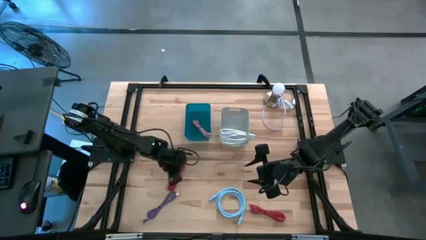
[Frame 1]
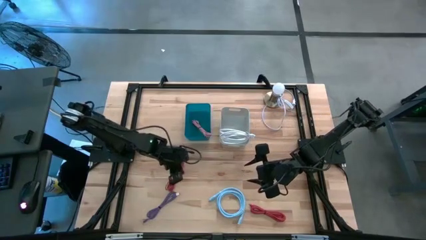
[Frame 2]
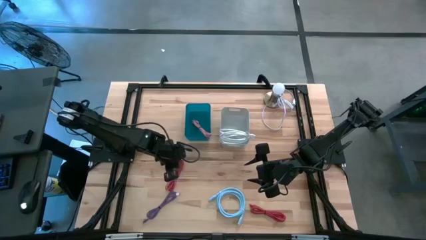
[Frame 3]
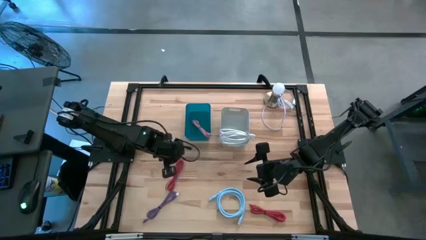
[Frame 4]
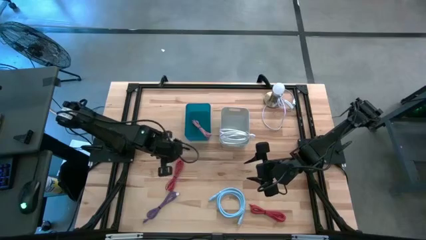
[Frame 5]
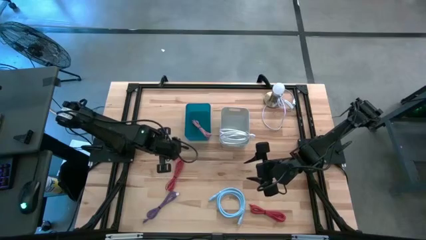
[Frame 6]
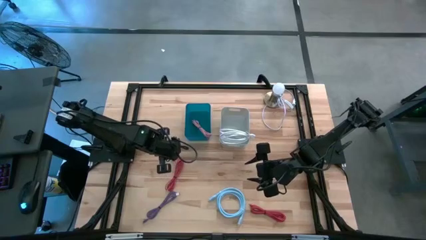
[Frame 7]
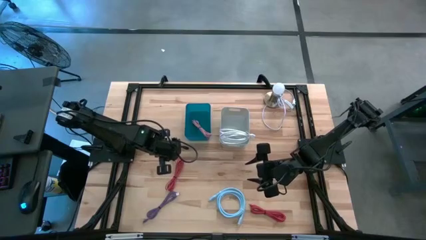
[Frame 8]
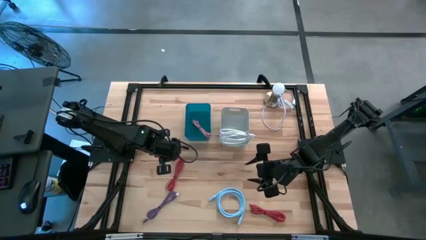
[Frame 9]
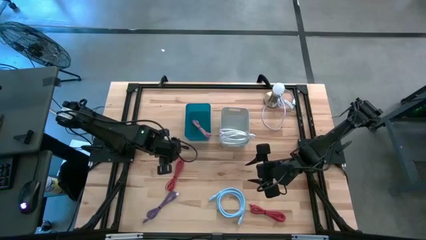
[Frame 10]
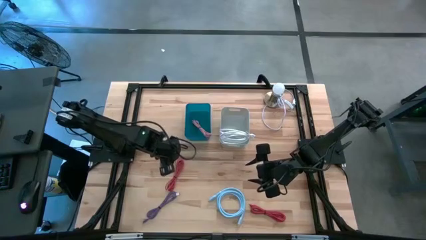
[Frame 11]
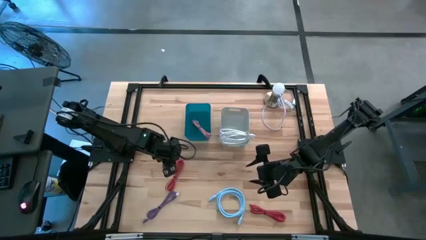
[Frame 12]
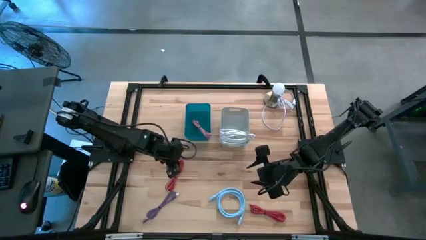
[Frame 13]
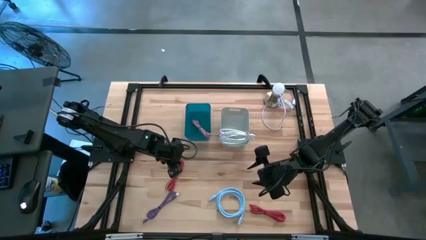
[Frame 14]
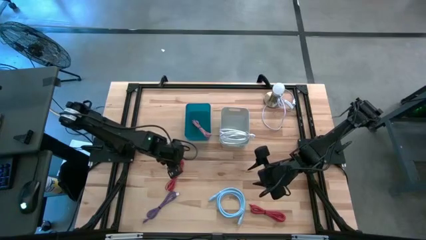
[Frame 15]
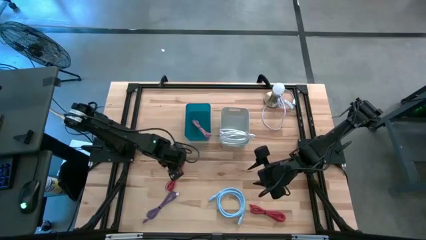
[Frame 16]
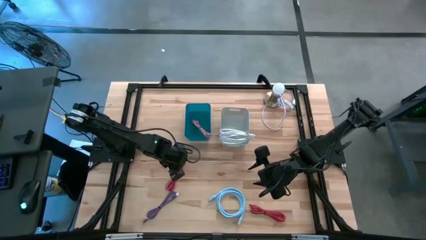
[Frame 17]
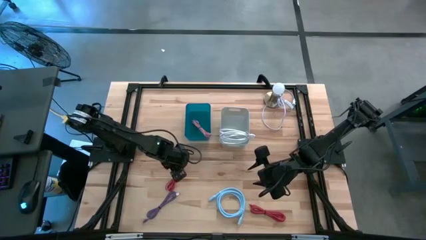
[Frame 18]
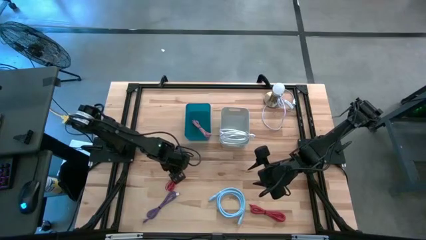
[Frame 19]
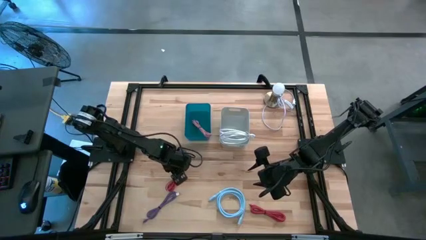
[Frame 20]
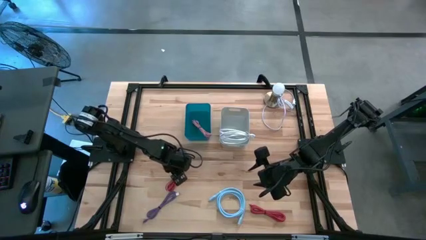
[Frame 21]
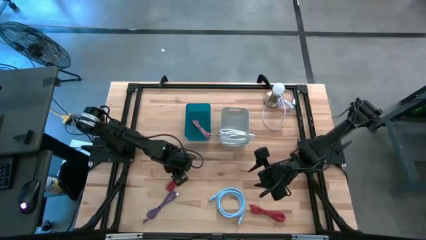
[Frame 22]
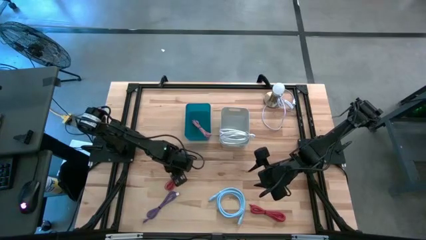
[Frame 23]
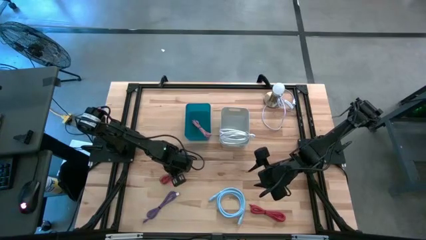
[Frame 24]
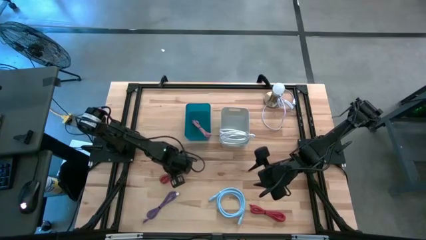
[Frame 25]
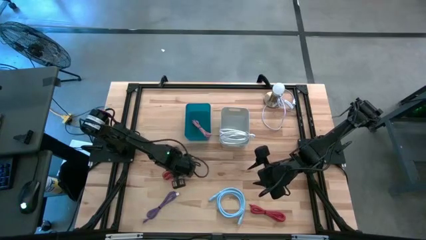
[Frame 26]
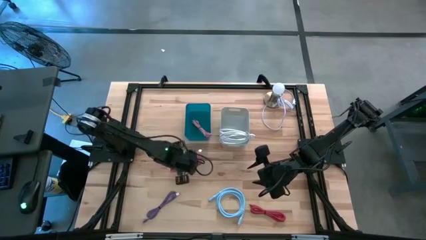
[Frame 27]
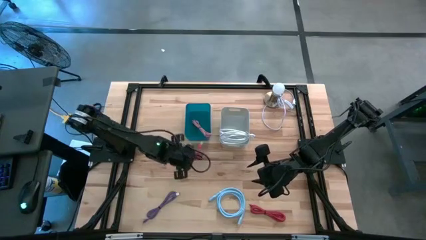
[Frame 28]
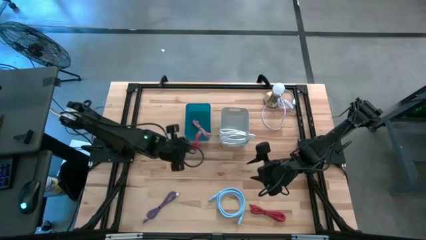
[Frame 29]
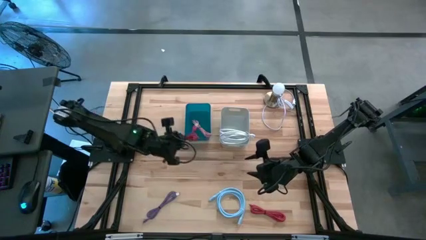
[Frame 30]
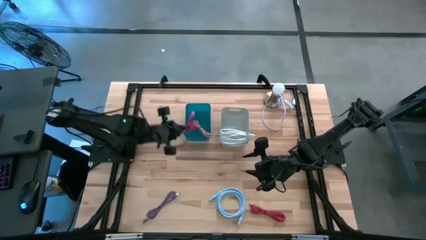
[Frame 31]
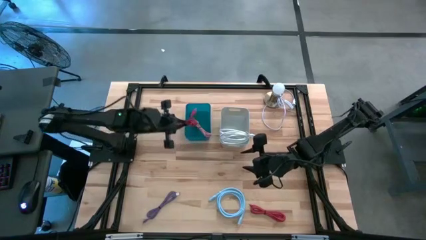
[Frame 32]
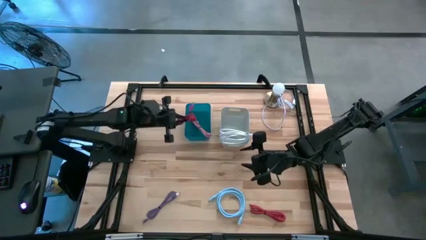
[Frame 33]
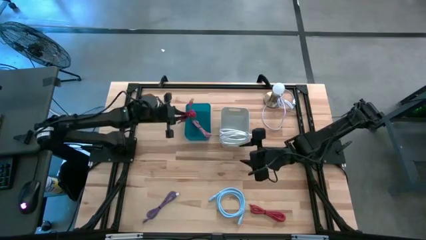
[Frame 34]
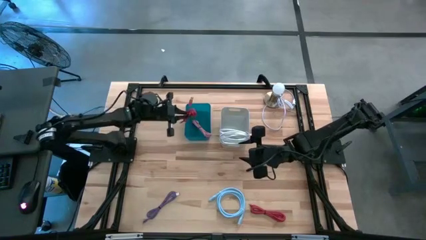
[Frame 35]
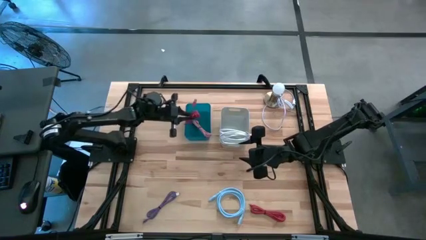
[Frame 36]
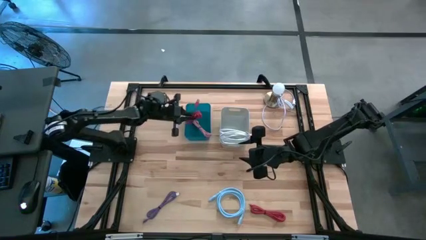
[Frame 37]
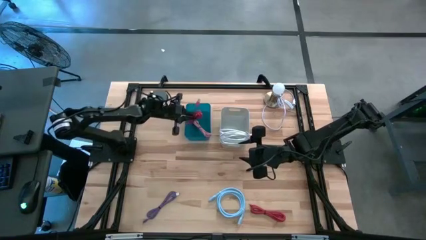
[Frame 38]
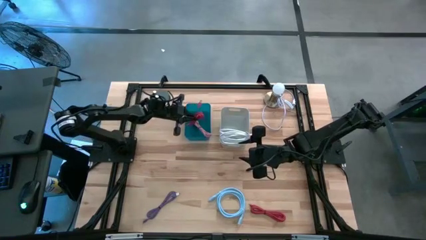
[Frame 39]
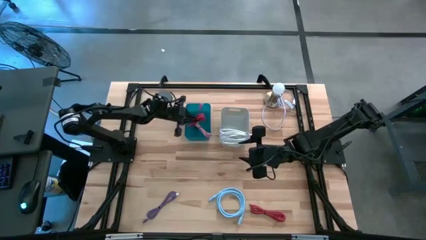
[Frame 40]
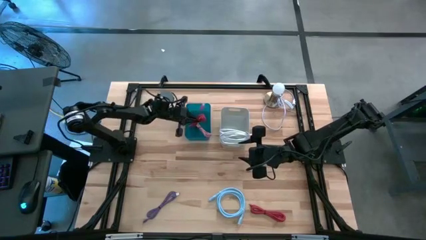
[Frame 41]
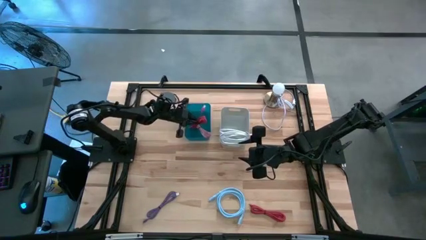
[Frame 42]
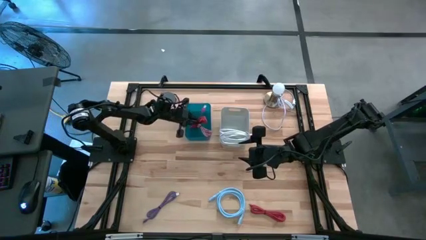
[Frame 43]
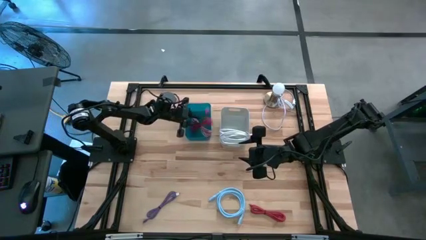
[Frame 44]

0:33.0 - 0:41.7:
Task: Pick & Place USB Port
Put the top red charger cable into the blue bin

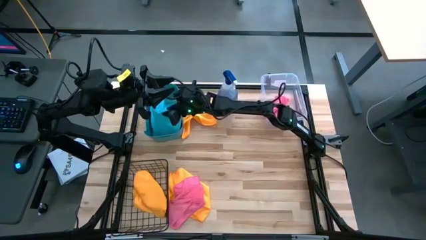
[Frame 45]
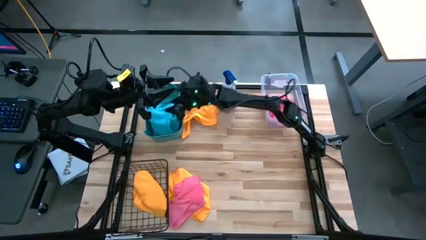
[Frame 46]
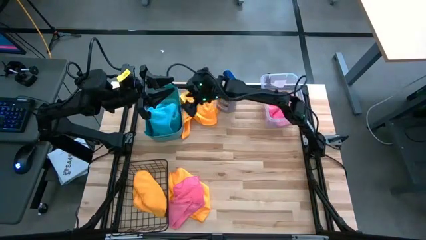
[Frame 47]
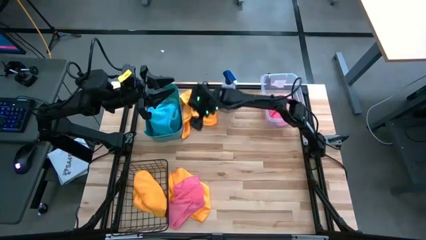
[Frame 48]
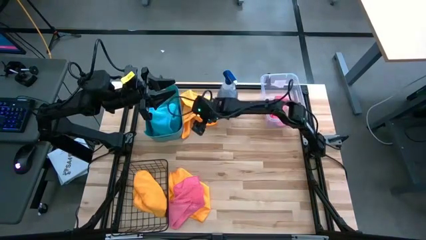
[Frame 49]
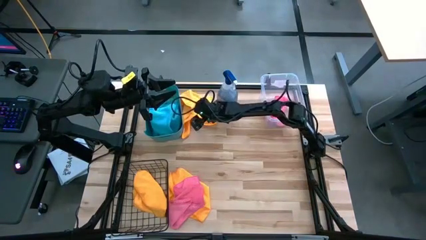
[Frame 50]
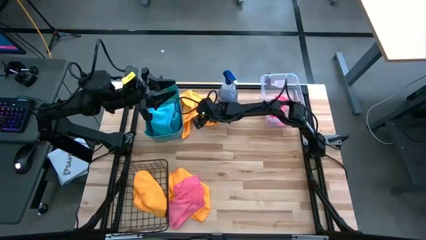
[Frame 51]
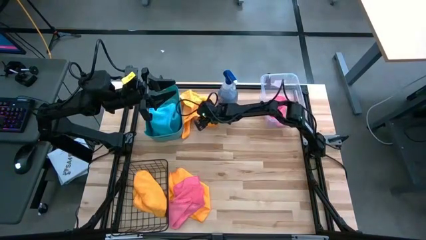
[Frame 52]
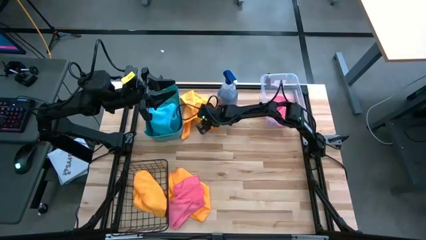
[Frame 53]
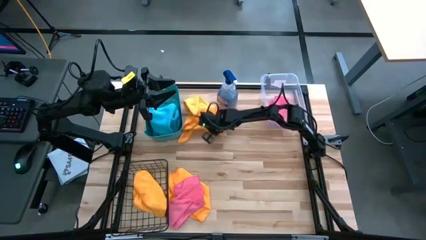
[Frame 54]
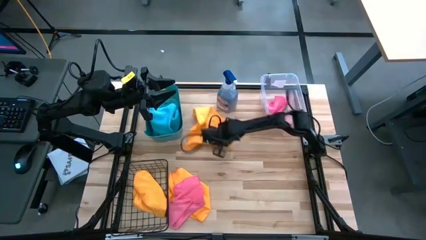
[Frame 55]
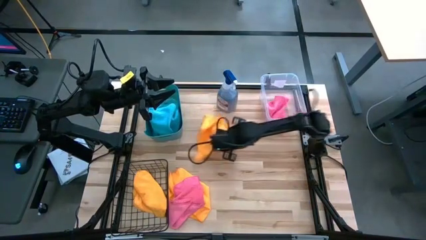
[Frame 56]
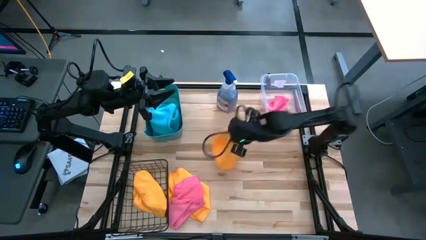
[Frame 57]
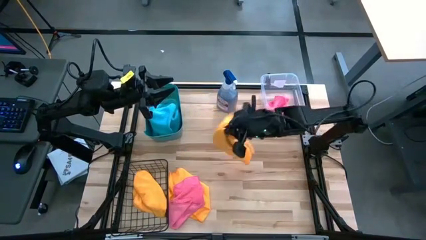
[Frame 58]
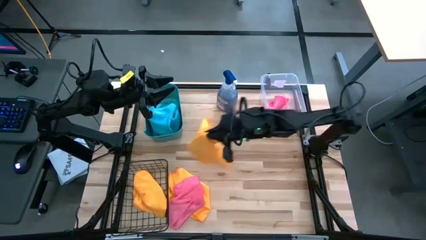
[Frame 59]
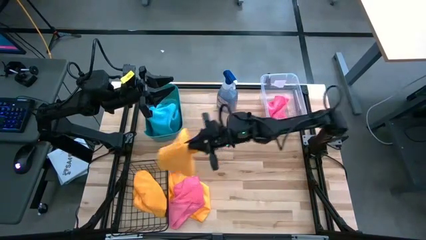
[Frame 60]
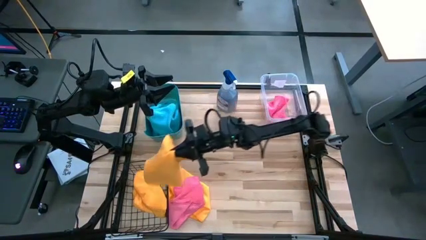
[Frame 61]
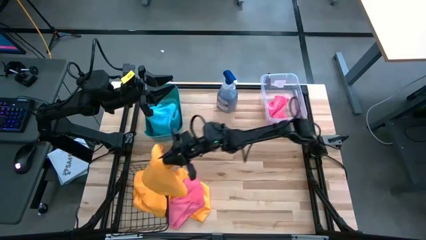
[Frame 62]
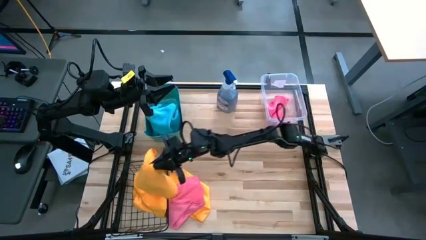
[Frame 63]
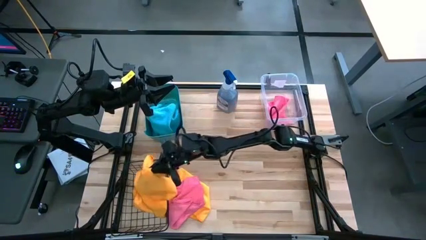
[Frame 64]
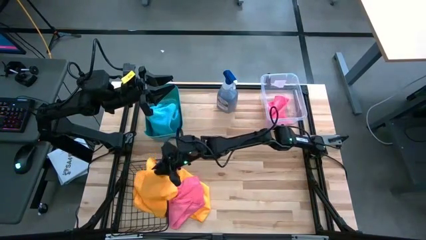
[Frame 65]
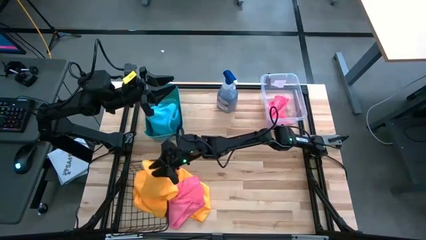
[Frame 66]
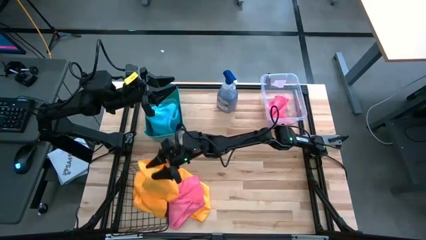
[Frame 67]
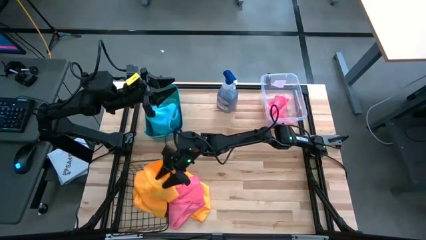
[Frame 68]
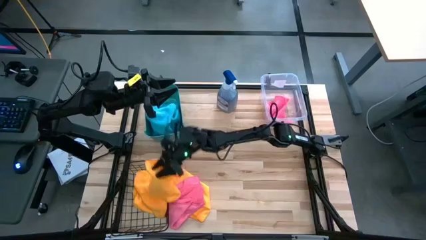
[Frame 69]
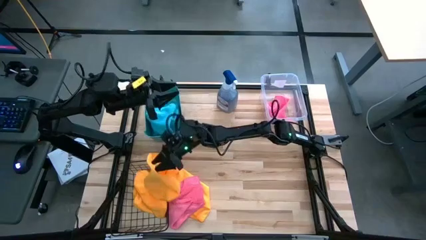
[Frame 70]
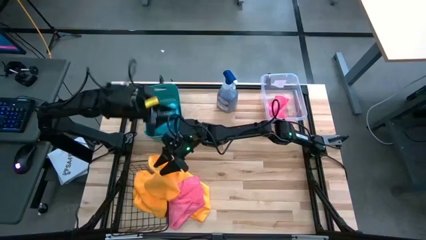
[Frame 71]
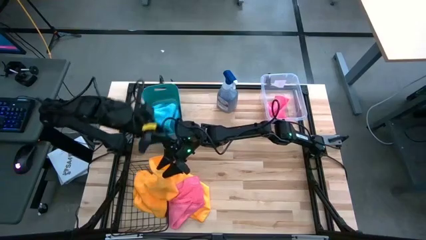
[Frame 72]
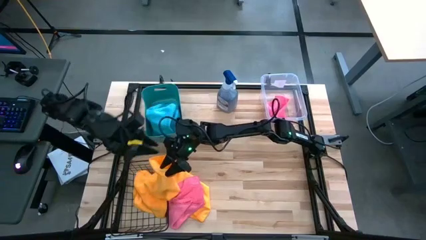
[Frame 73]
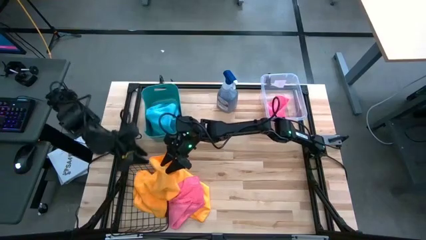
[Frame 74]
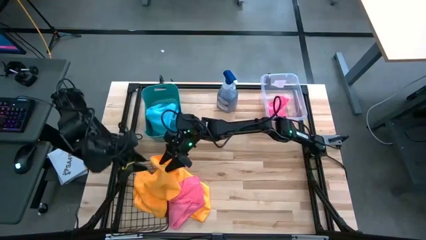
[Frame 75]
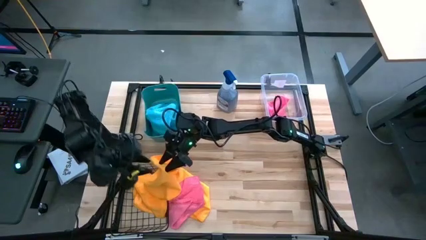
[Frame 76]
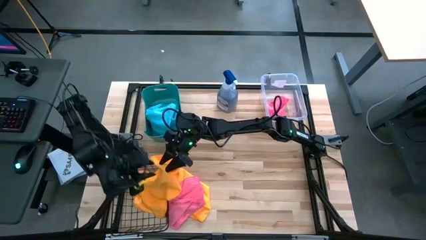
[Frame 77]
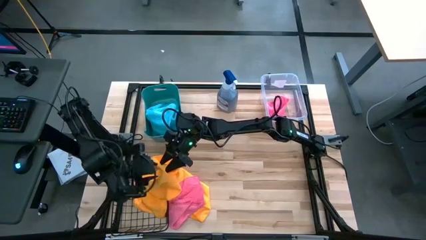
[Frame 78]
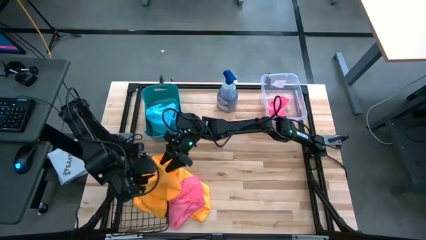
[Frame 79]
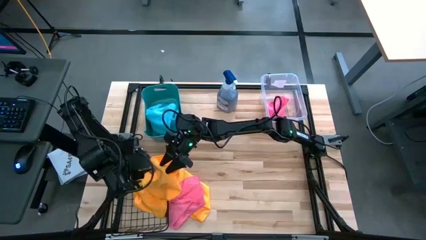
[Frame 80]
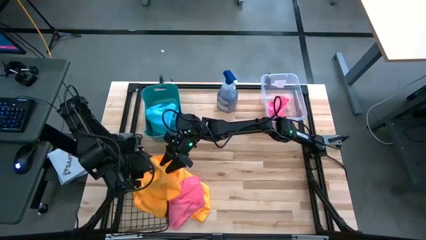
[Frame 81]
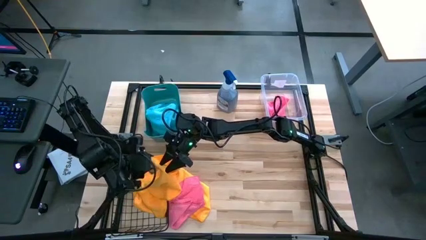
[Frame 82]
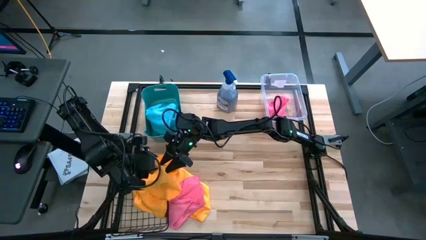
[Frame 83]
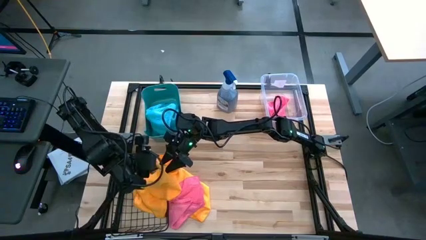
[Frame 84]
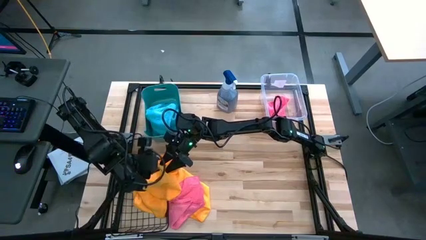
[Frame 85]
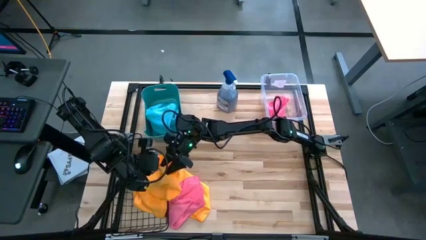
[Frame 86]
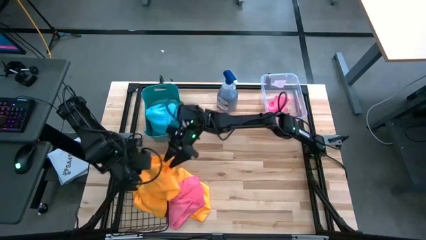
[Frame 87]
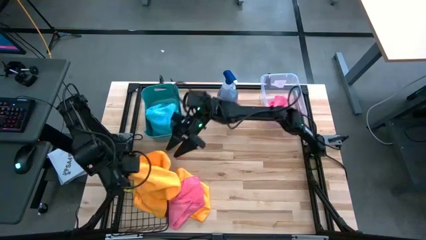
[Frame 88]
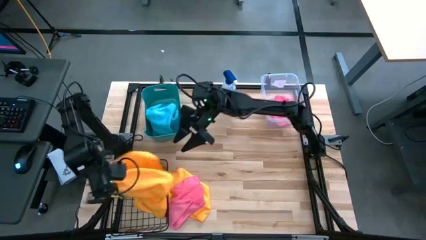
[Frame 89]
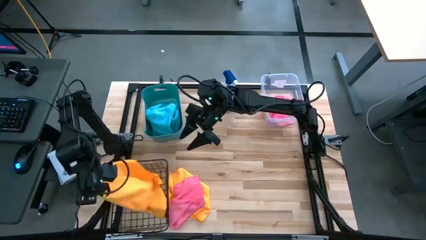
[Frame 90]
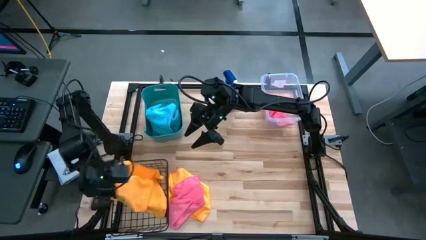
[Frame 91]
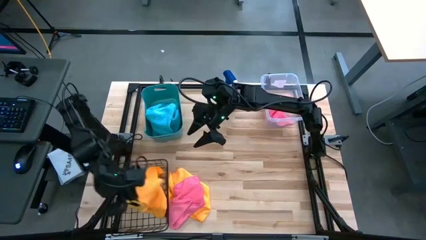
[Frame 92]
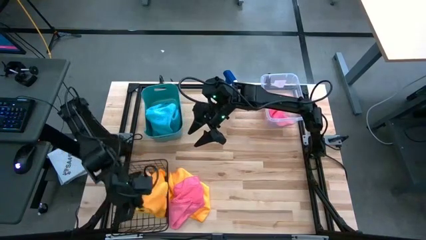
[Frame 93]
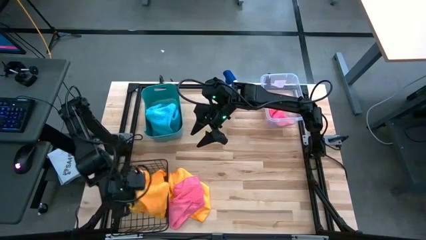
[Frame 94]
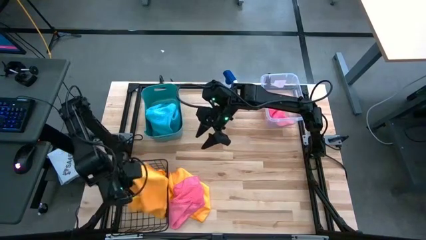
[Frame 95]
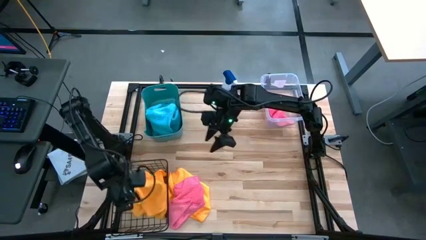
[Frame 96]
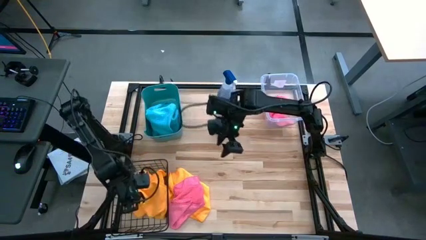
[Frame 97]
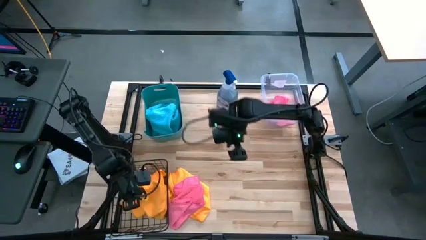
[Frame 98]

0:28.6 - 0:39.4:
Task: Sort microfiber towel by color & place in baskets
Put the top yellow towel in the basket
